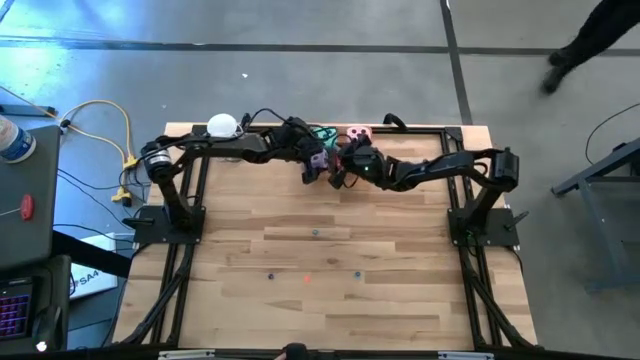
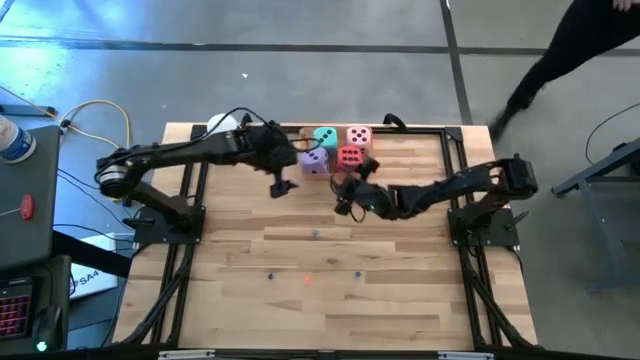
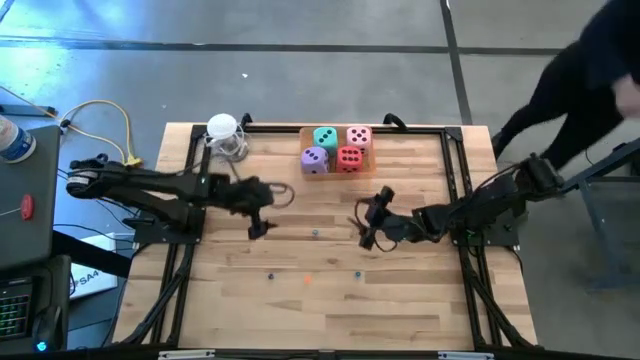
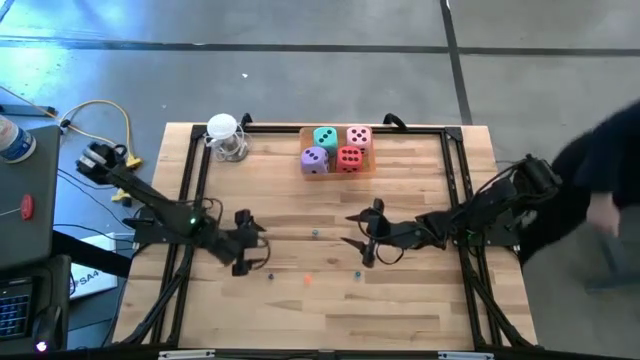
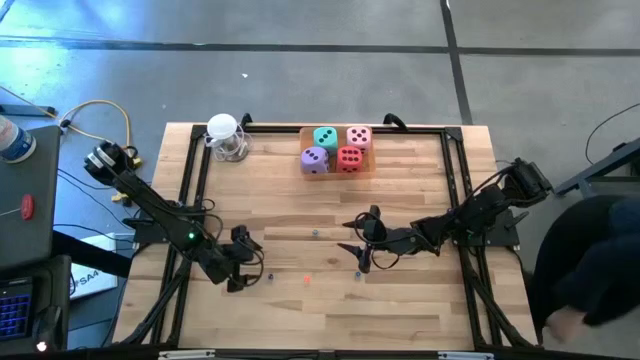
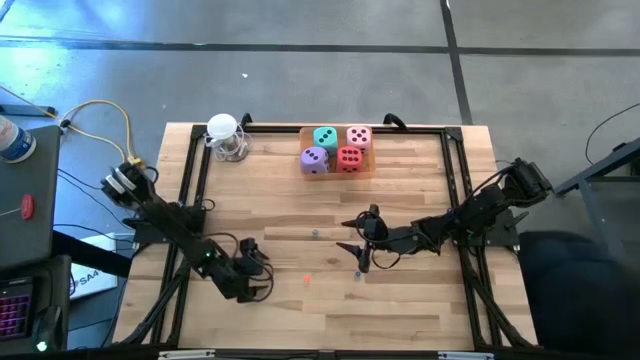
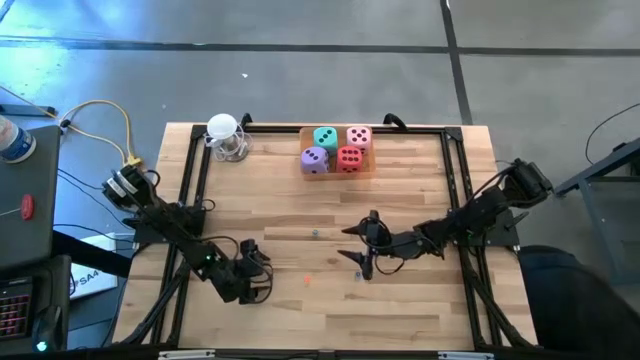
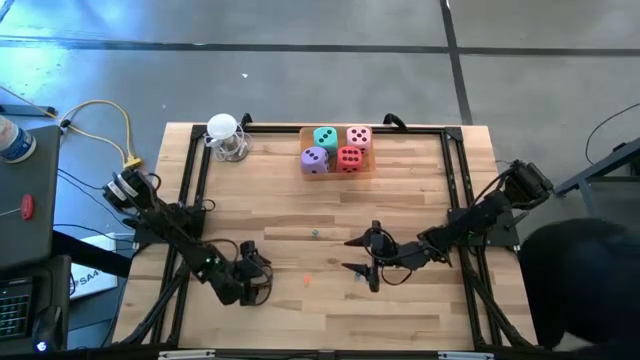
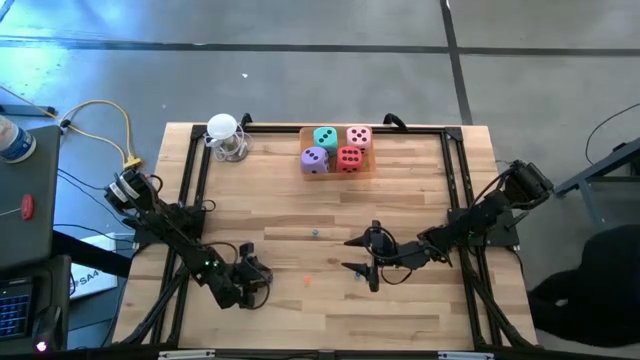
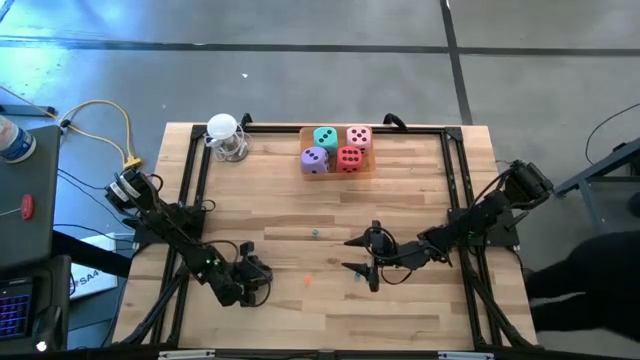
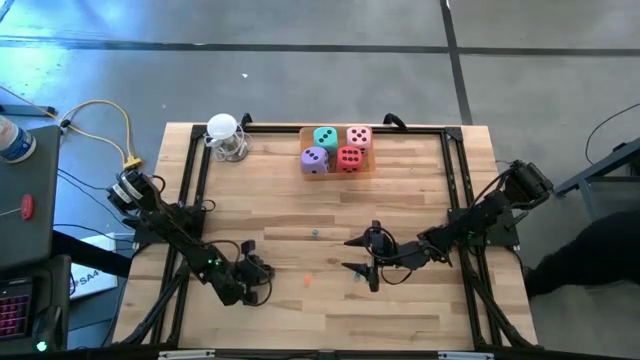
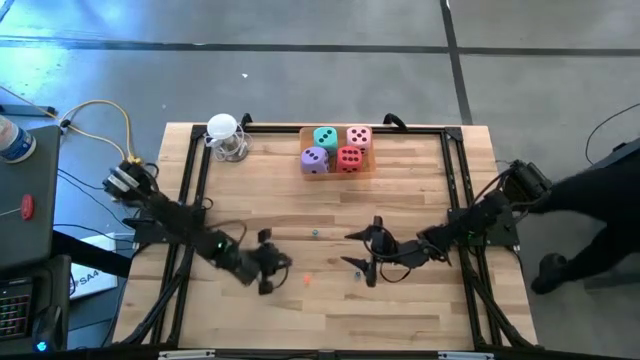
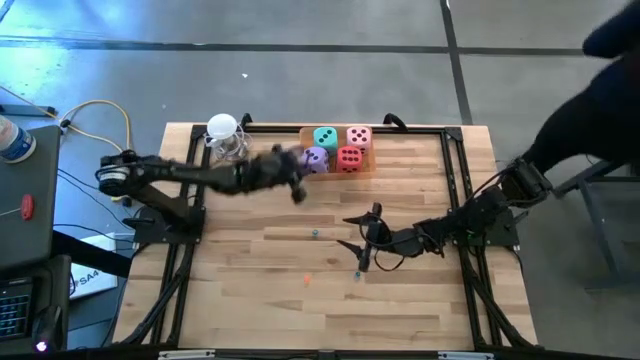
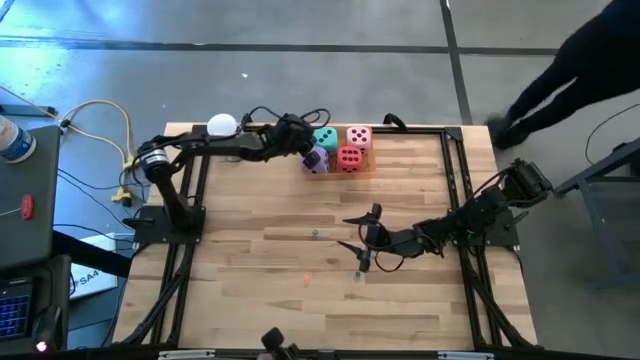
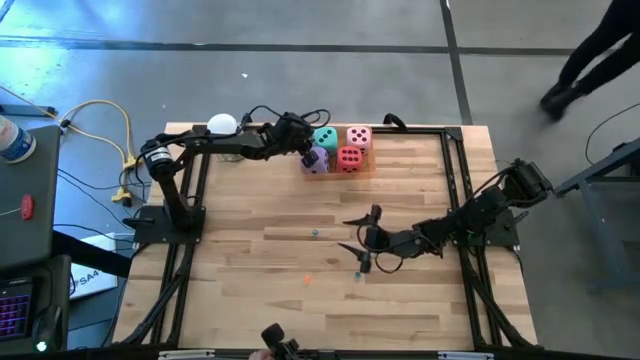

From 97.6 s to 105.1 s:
Task: Pick & Place Dice
Put the blue die into the orange bin

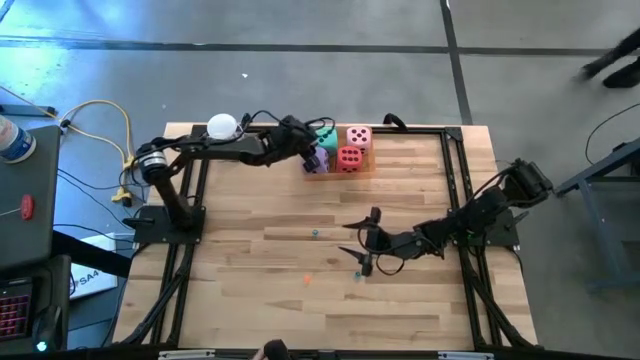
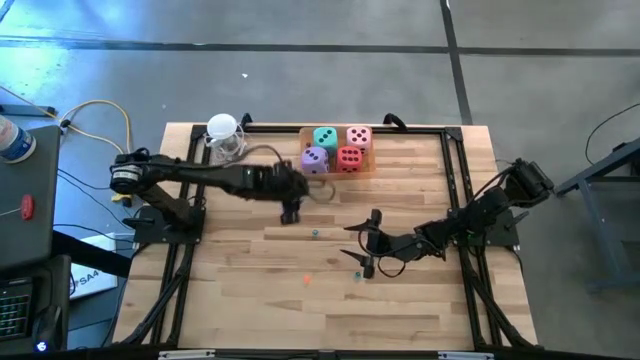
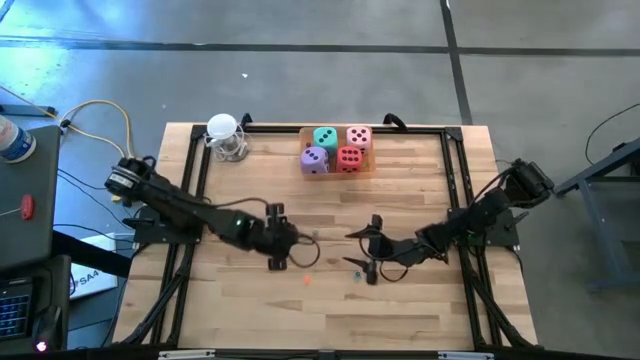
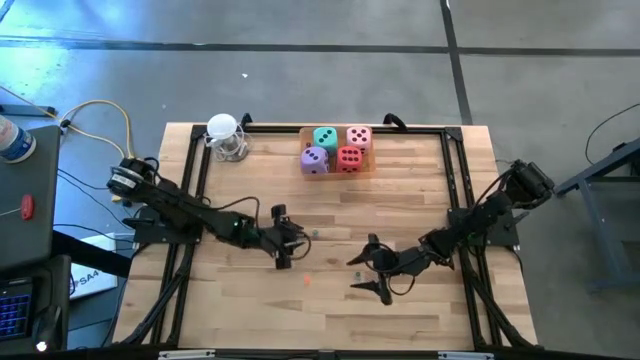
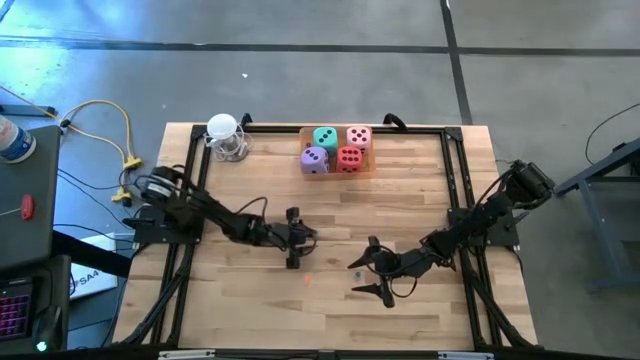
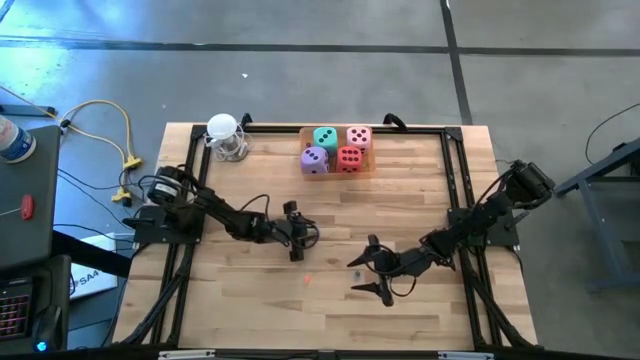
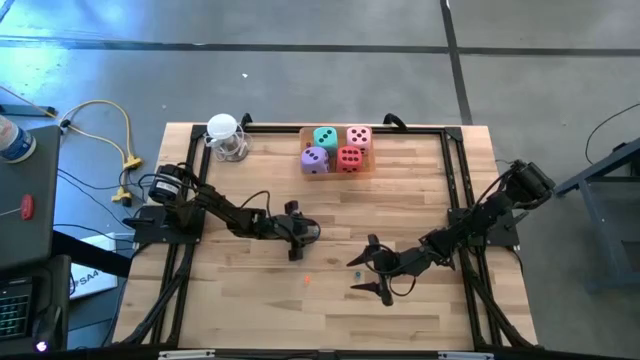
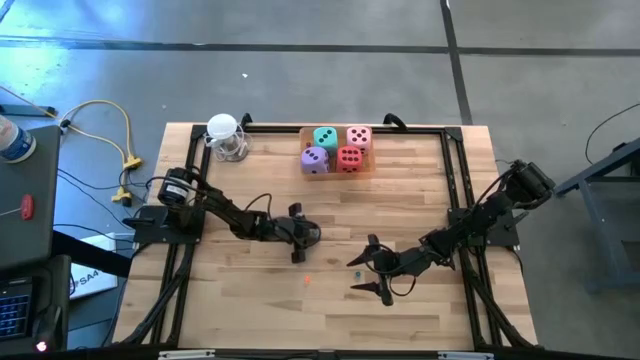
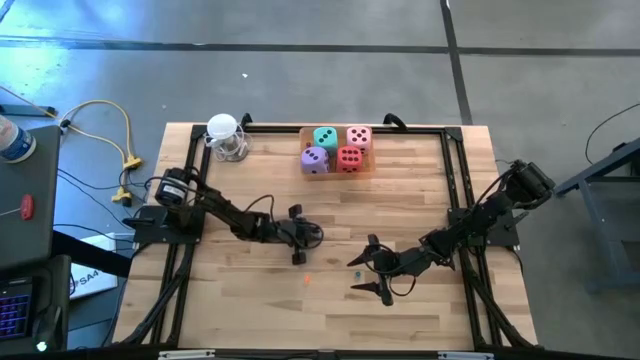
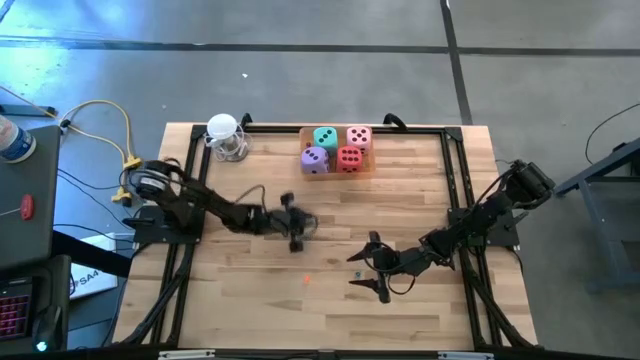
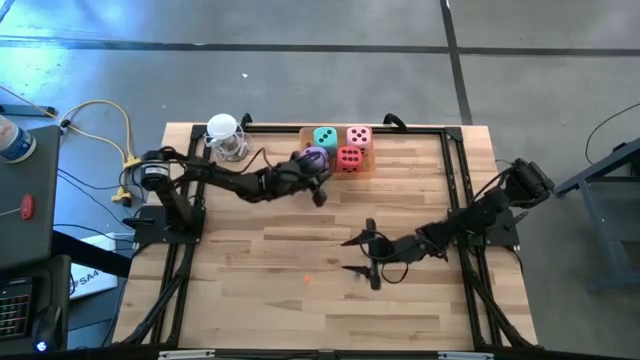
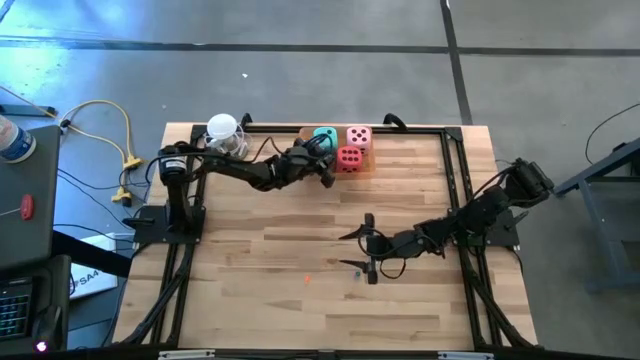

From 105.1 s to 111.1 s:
Put the blue die into the orange bin

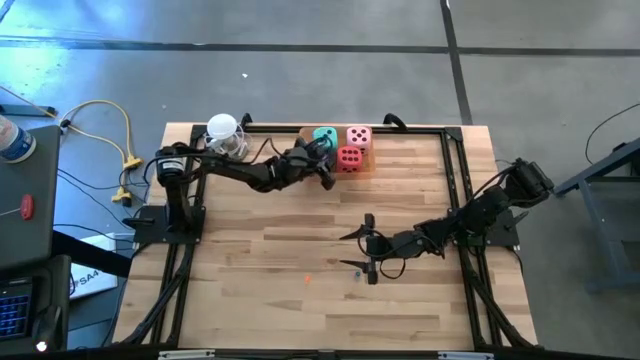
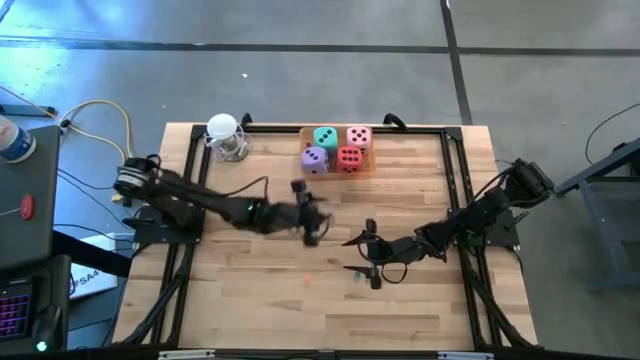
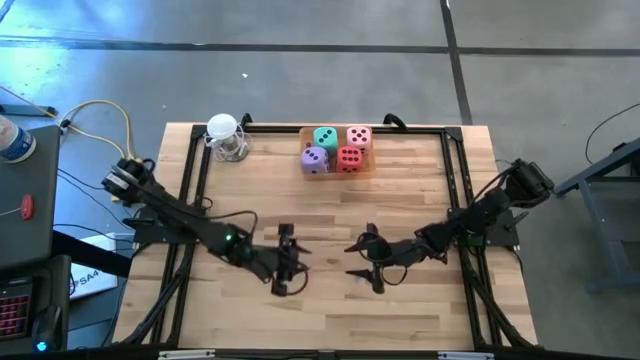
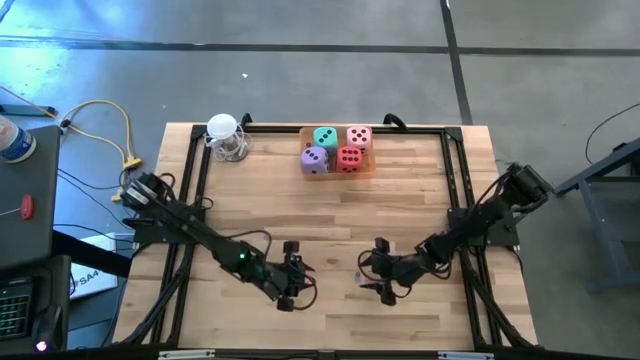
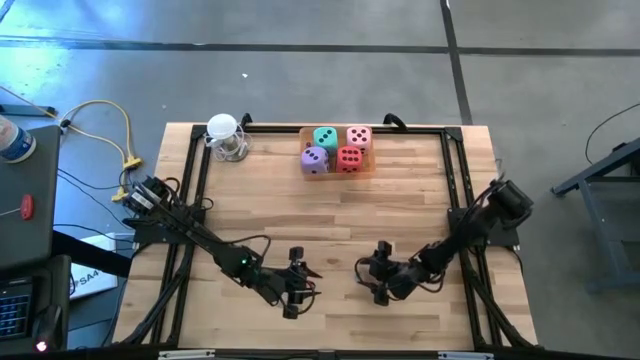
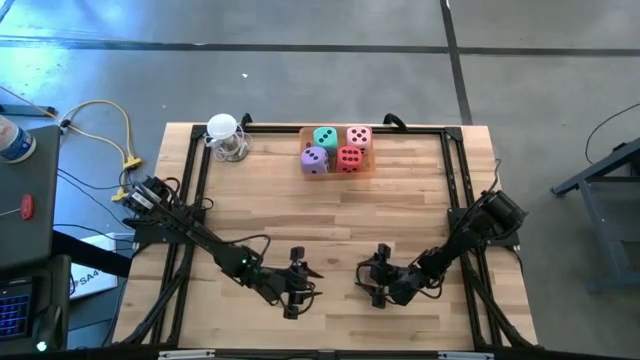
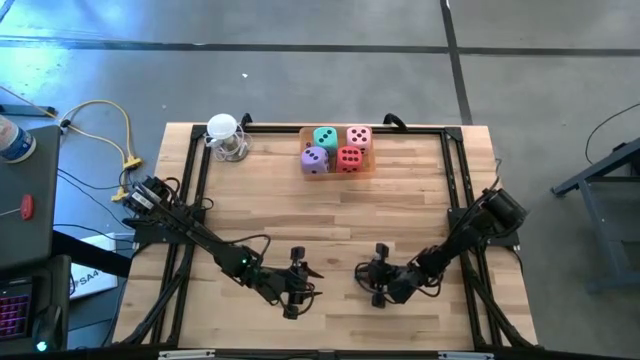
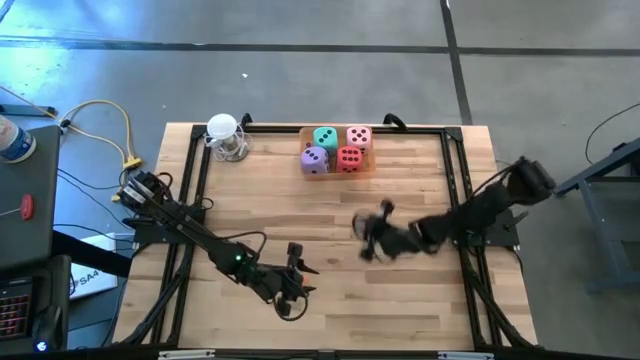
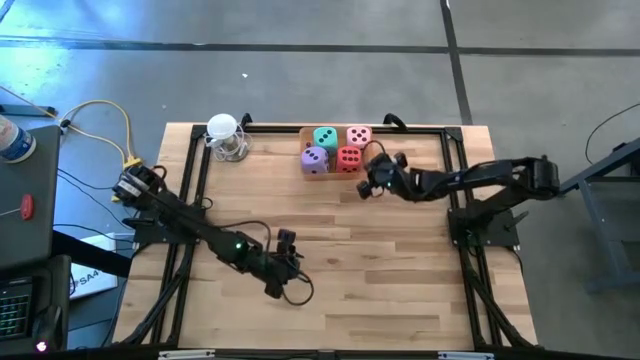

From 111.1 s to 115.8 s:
Put the blue die into the orange bin

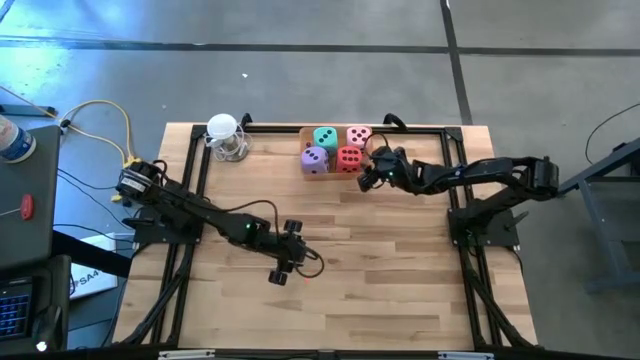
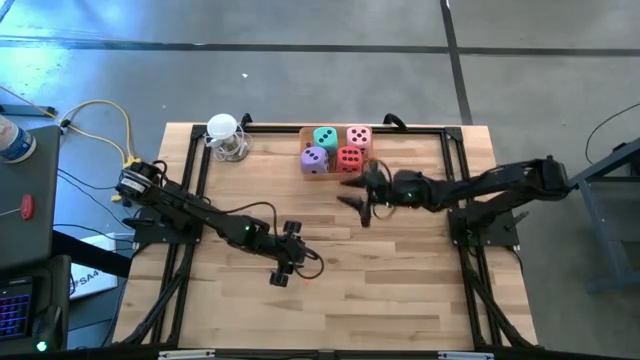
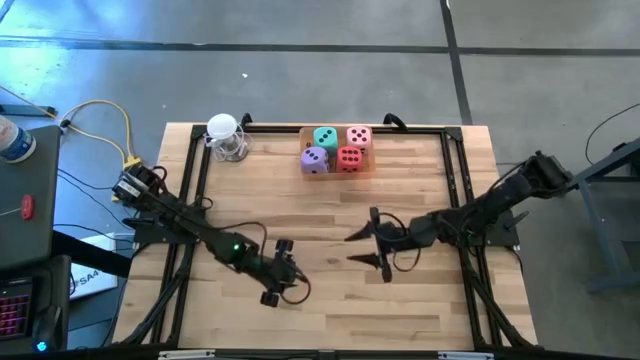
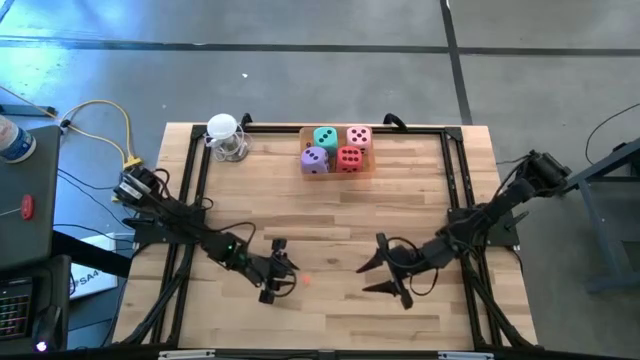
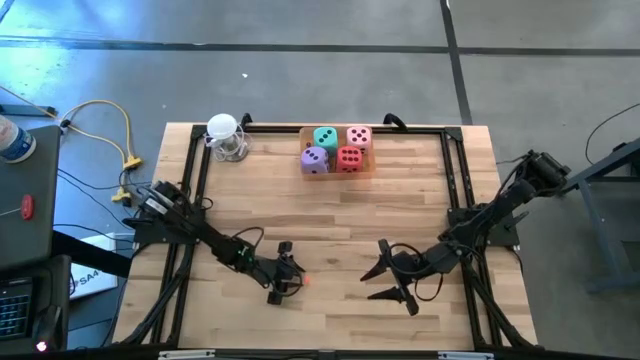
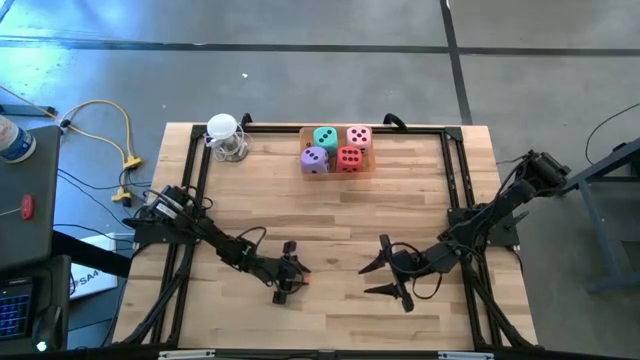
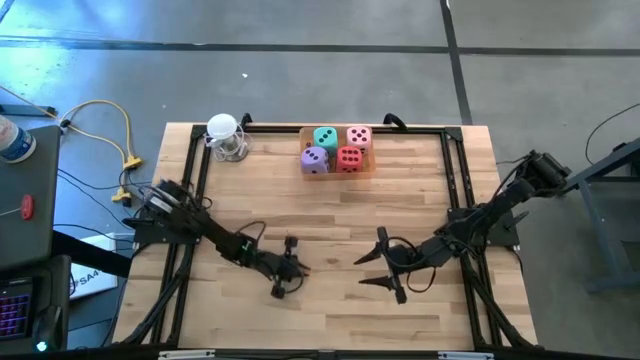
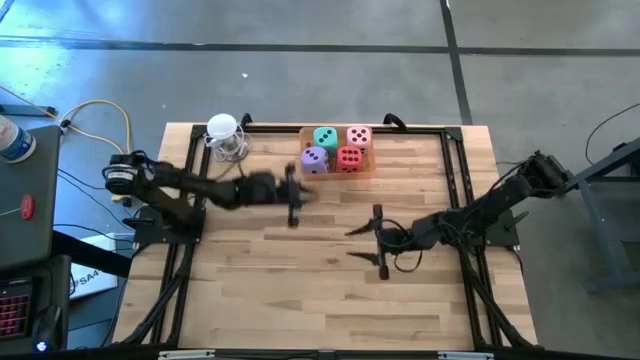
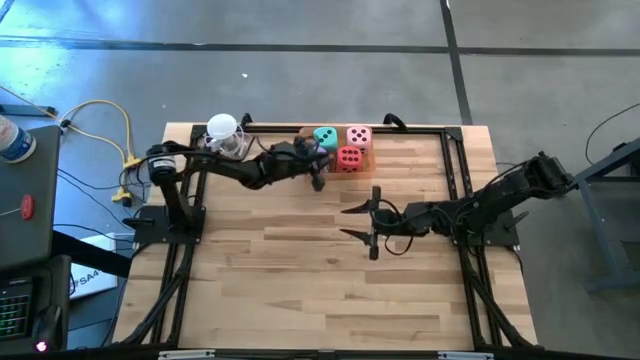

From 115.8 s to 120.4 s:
Put the orange die into the orange bin
